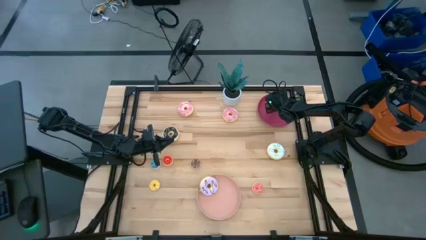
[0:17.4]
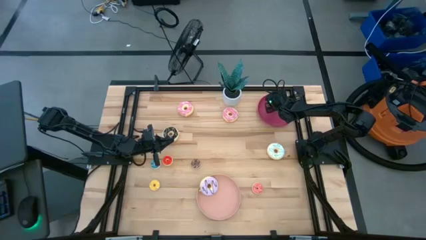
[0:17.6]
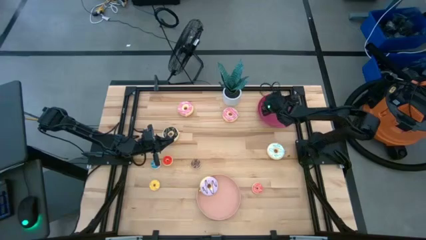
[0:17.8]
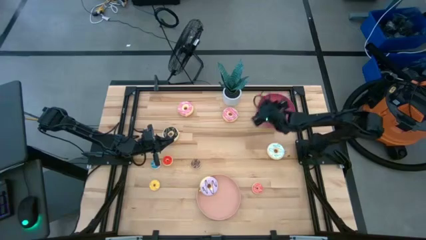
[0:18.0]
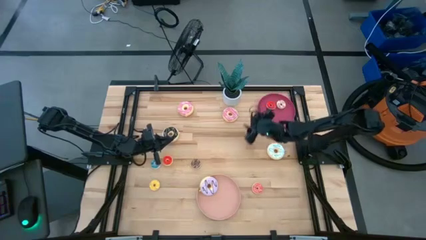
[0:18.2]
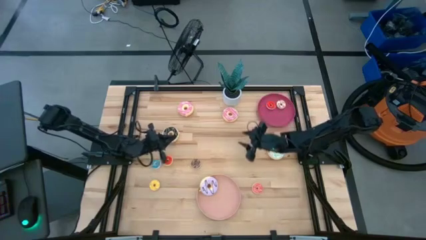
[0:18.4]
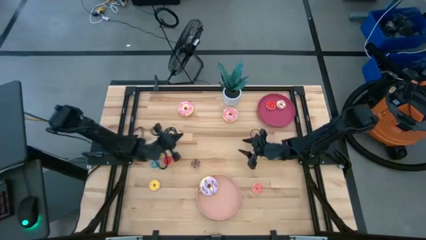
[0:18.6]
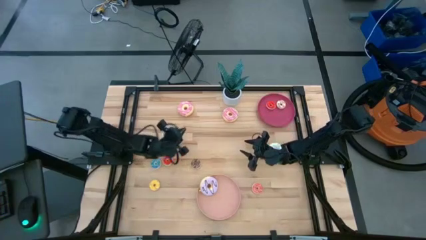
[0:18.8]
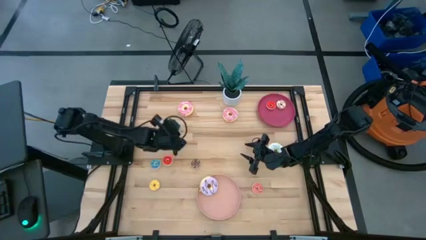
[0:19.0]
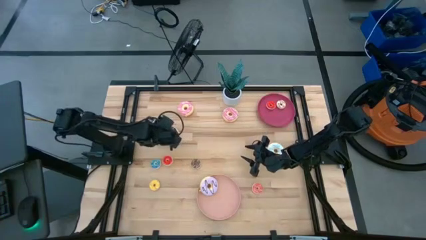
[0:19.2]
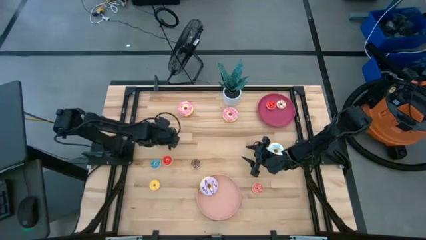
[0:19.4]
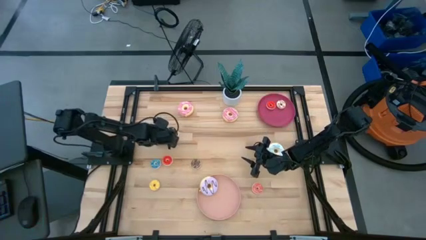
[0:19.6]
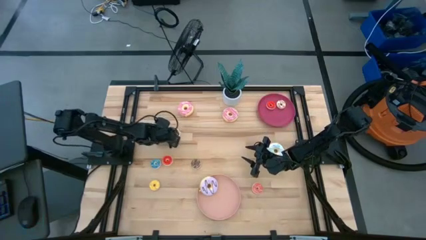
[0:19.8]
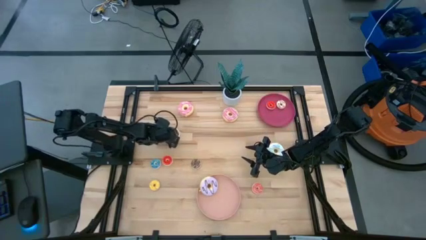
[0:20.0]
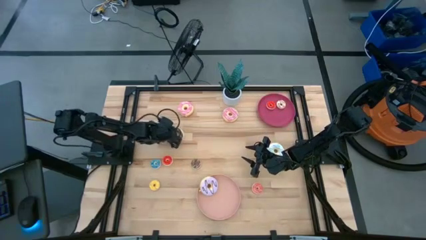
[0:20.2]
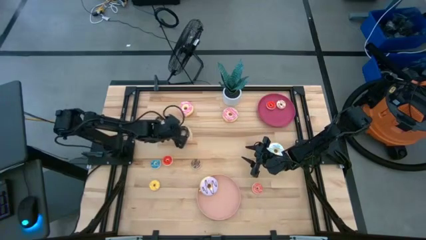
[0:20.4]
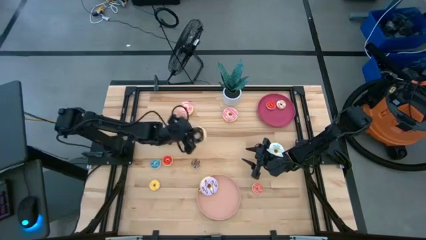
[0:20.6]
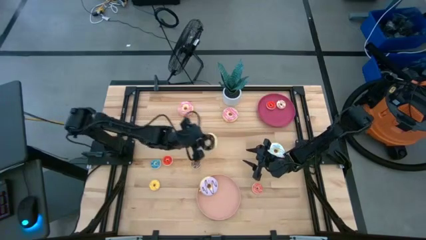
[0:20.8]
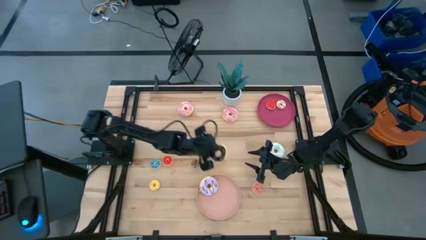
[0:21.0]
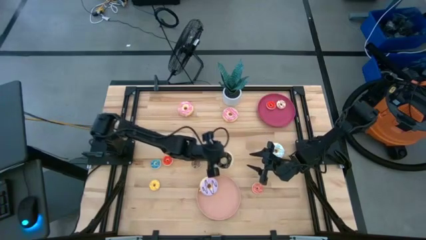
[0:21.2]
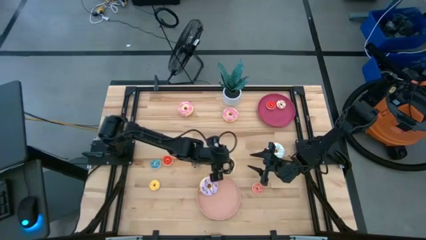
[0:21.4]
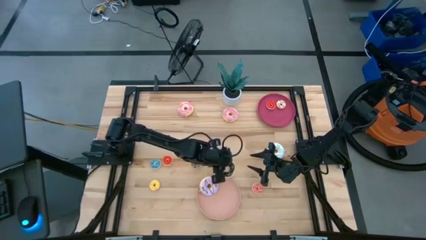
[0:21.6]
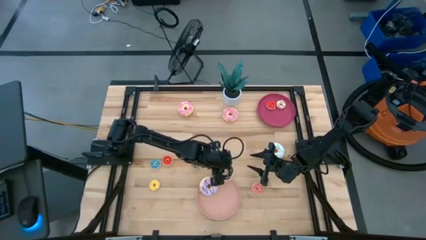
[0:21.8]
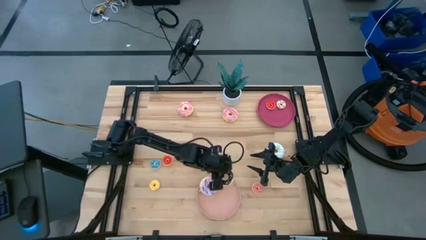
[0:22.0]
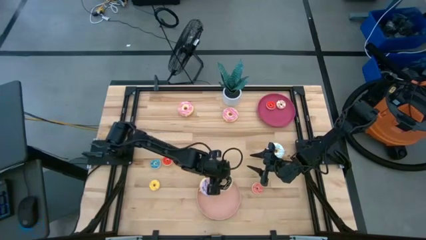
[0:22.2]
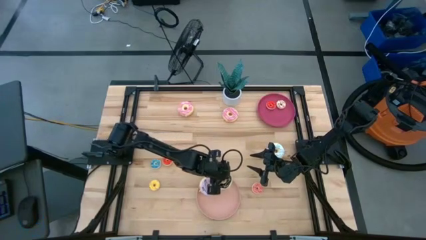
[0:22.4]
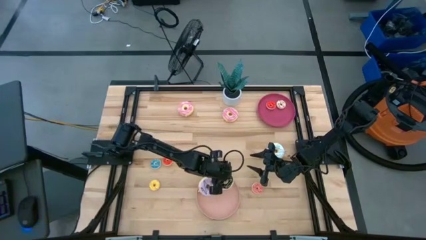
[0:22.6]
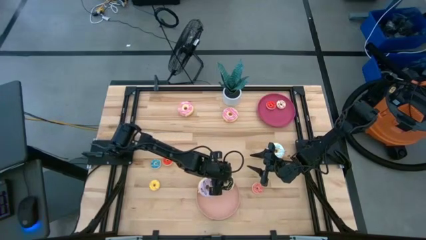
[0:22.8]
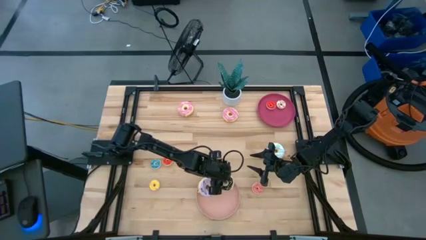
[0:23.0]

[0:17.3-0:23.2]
Task: Pick & Place donuts
Put the large black donut on the pink plate

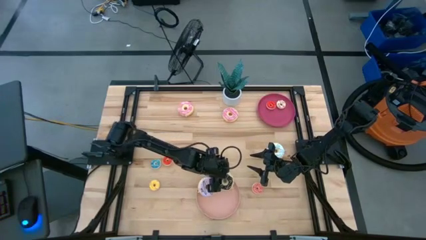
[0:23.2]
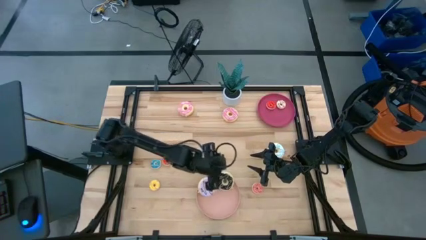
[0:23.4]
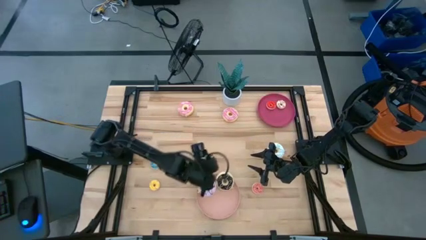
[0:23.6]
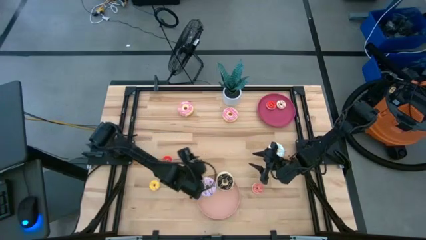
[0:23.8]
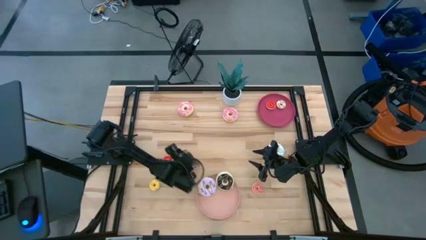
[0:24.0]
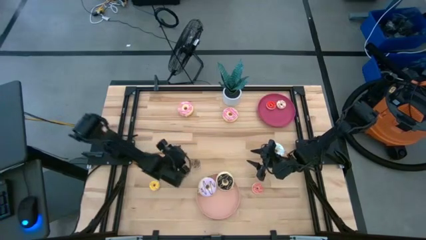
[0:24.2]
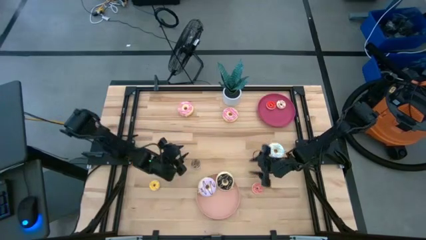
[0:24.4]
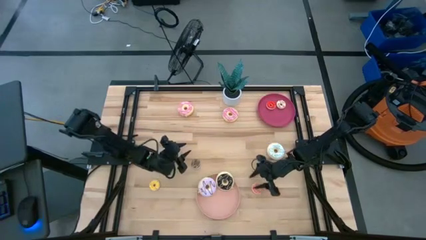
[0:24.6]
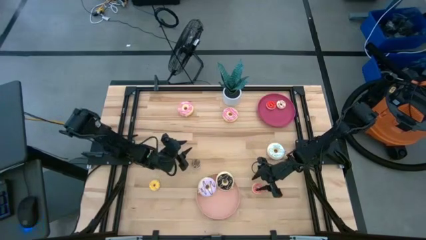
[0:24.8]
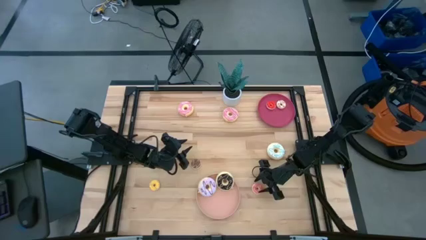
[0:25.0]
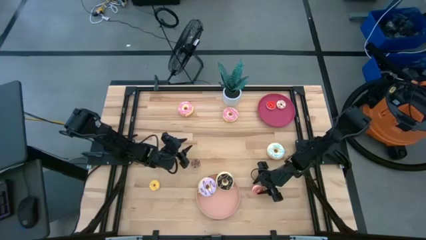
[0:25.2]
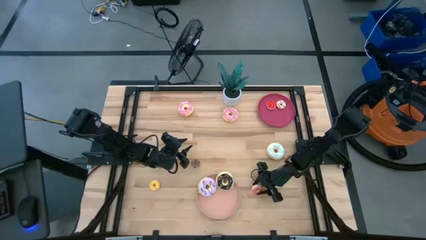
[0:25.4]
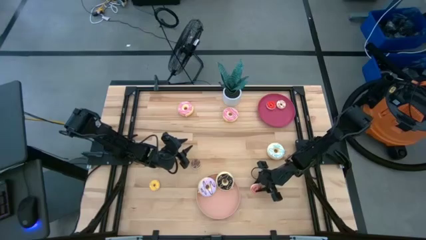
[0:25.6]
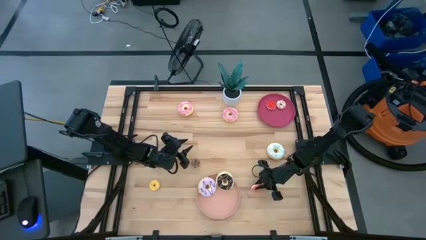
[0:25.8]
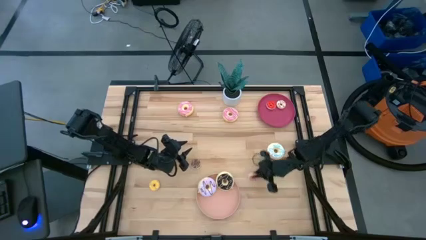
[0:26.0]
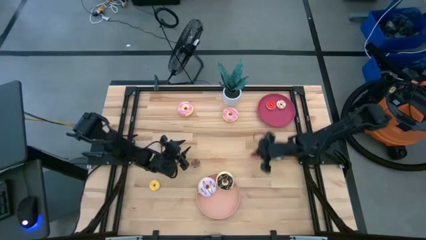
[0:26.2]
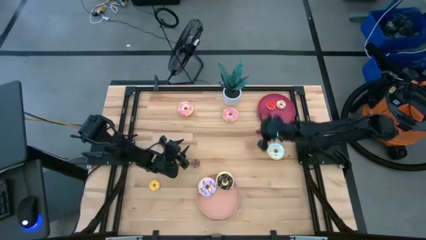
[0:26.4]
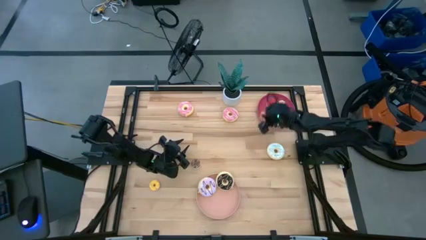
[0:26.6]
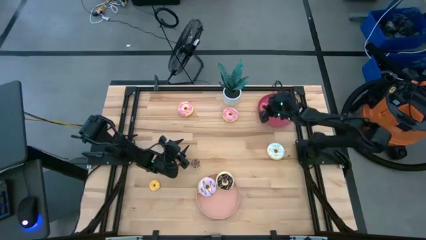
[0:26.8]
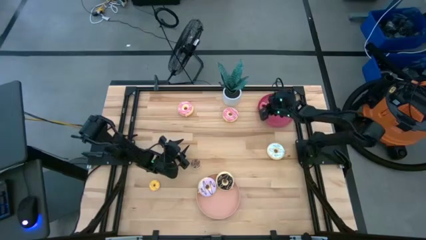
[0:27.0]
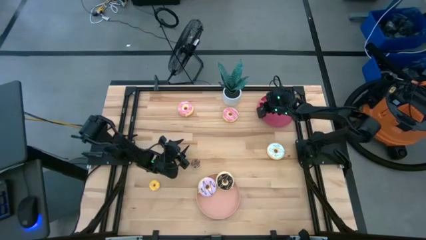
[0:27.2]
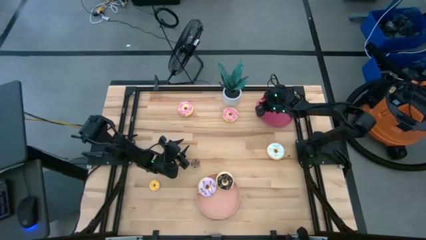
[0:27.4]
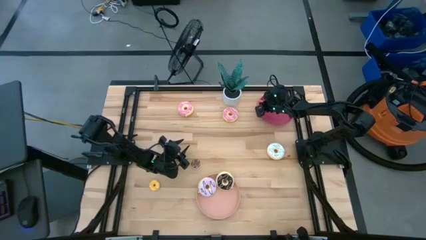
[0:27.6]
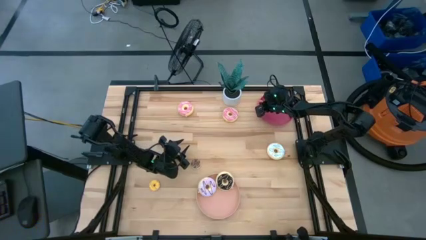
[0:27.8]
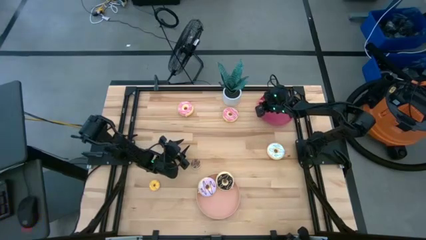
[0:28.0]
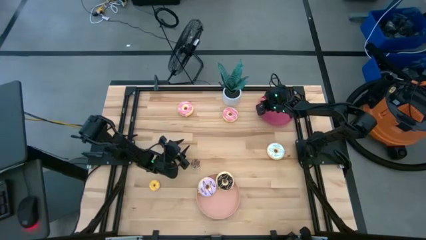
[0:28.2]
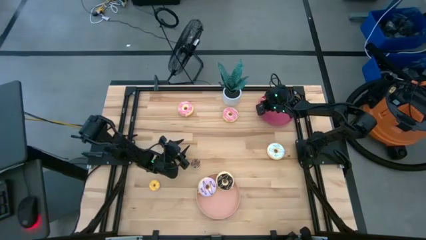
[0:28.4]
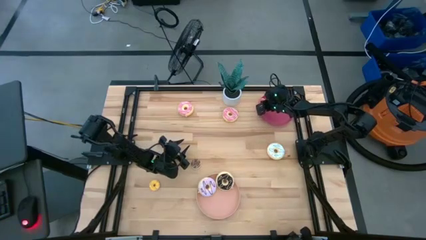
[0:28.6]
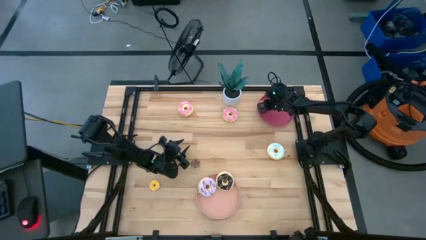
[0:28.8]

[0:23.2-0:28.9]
Put the small pink donut on the red plate

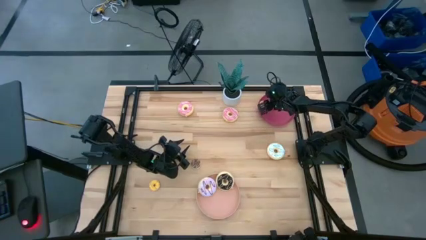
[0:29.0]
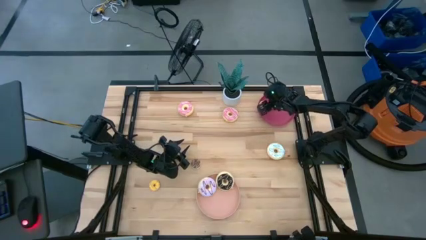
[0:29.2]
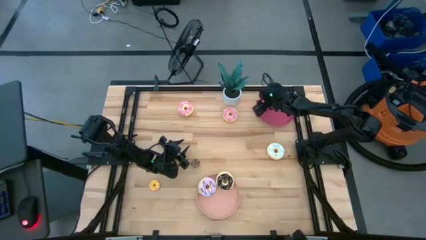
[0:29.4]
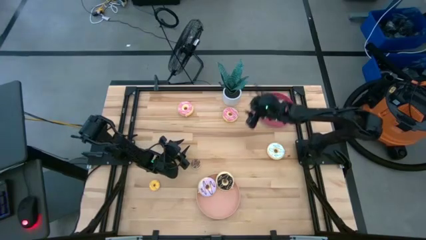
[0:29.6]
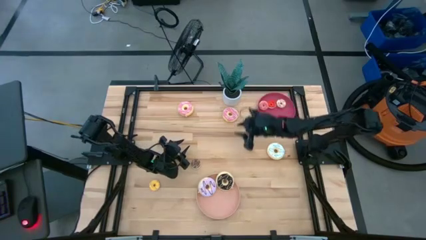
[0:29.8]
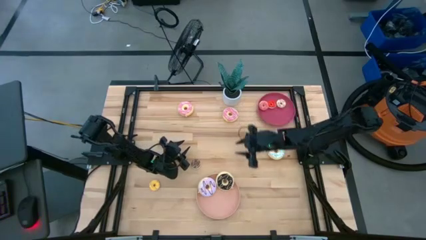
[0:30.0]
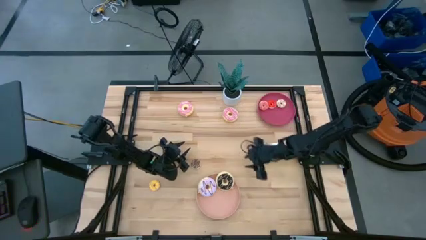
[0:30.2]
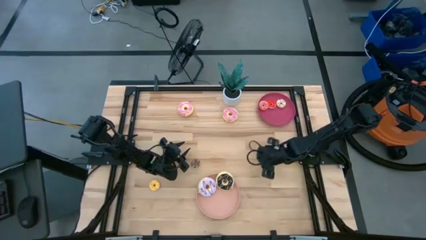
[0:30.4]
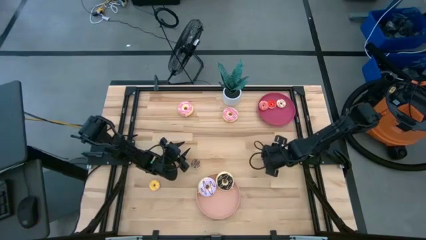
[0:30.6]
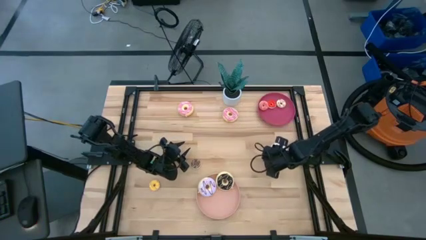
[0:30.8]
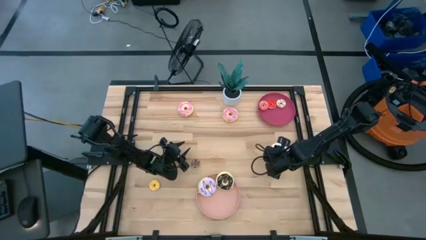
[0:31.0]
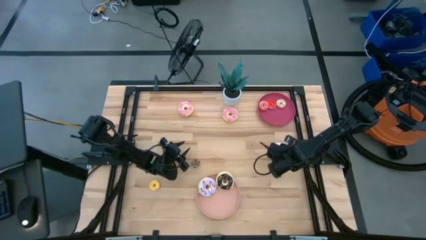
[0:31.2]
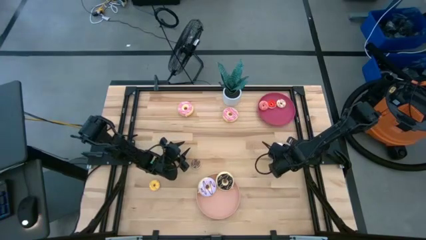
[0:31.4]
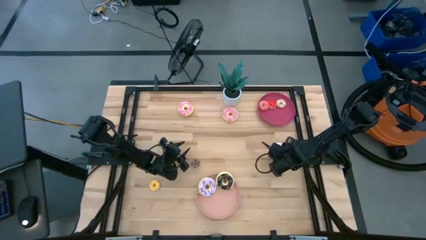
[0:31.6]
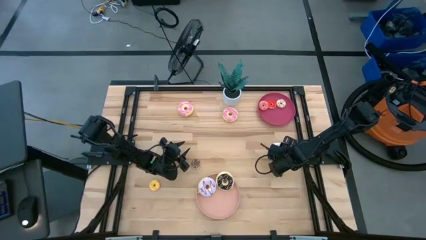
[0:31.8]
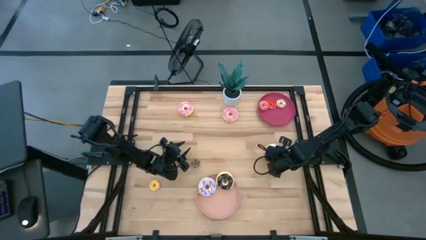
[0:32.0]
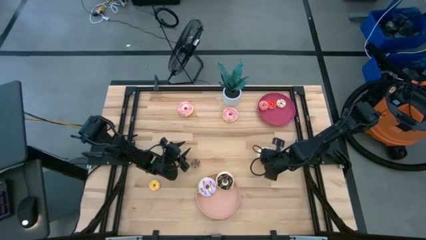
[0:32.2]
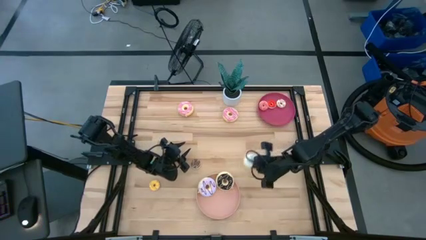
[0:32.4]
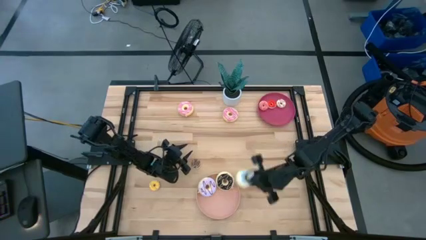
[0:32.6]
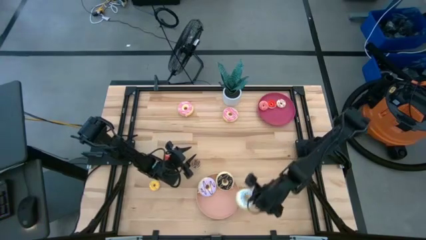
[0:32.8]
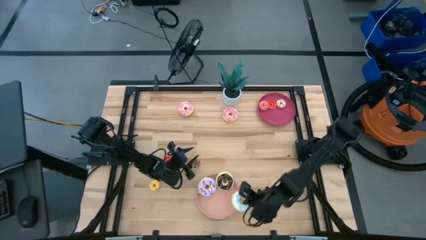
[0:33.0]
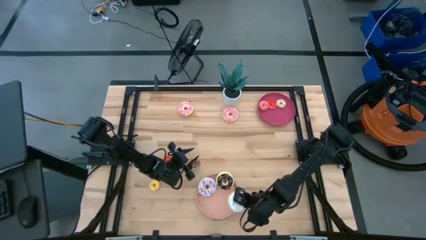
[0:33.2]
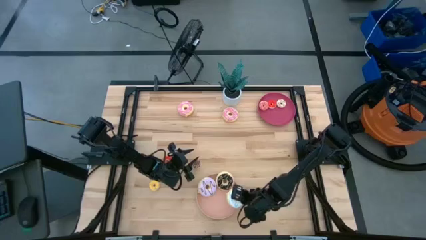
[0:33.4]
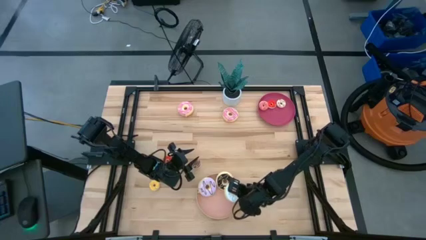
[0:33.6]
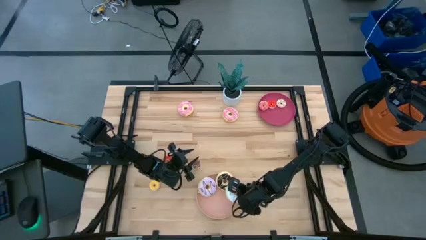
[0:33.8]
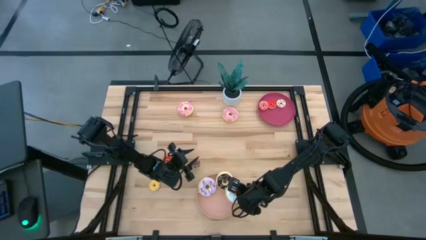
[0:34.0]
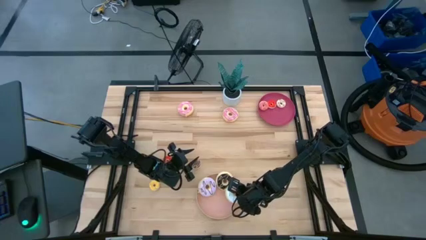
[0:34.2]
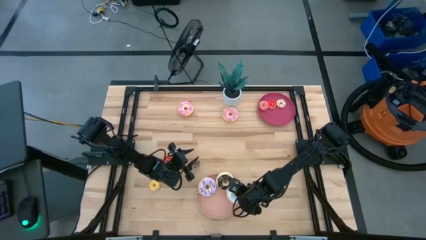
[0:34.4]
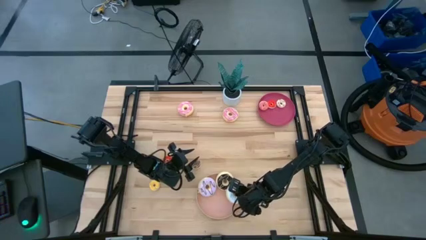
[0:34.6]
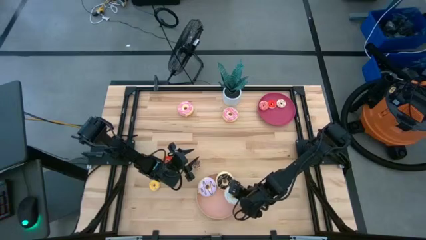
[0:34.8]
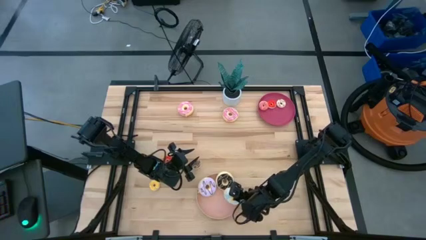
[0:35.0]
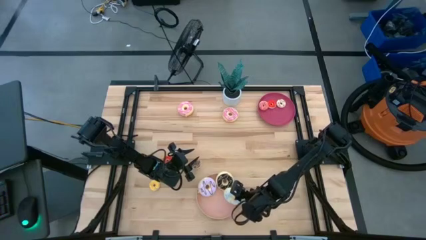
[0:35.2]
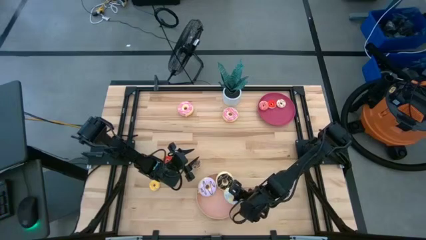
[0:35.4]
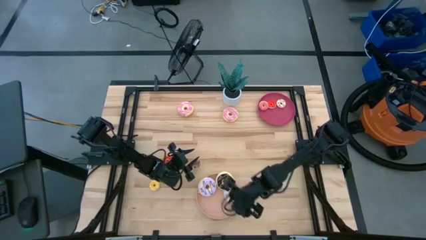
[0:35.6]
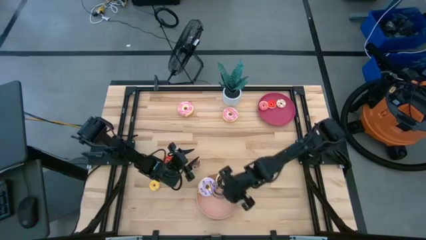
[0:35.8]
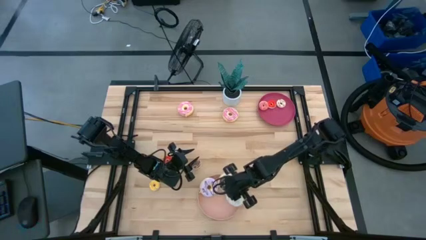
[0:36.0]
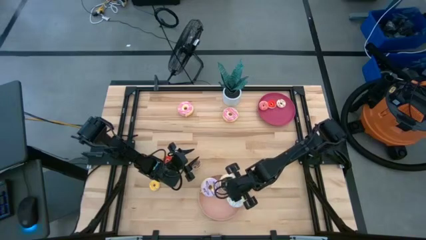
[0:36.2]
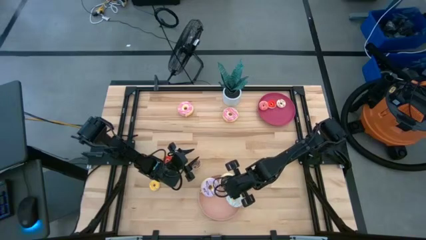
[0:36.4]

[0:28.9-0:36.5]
Put the large white donut on the pink plate
